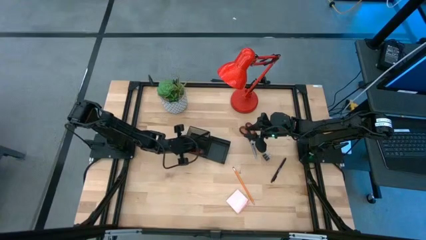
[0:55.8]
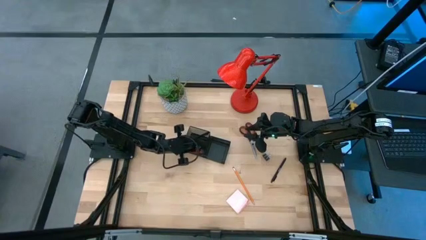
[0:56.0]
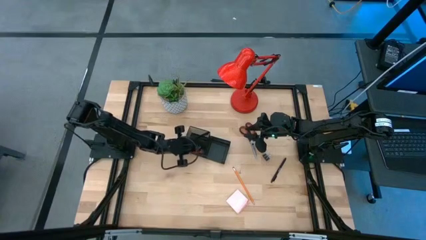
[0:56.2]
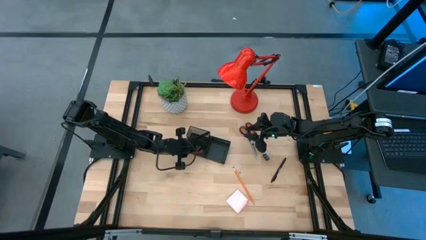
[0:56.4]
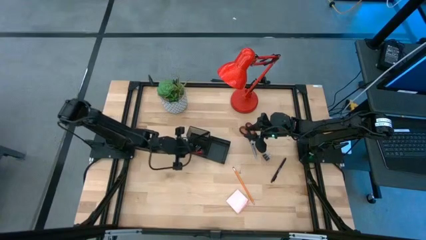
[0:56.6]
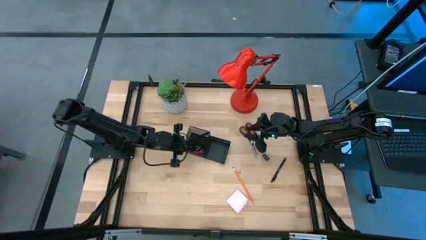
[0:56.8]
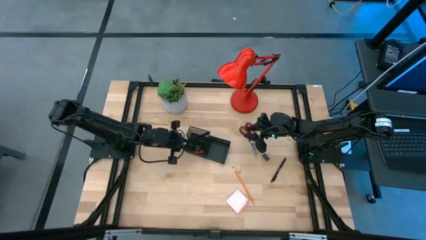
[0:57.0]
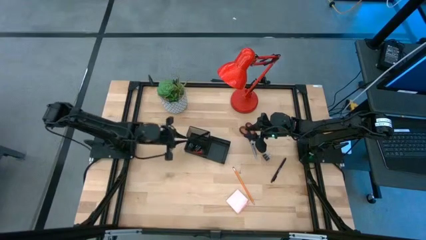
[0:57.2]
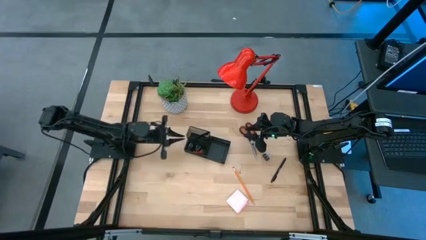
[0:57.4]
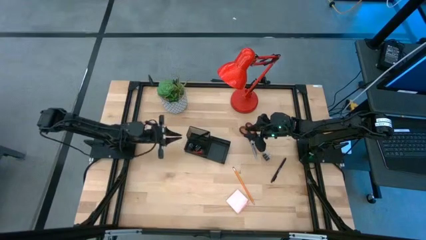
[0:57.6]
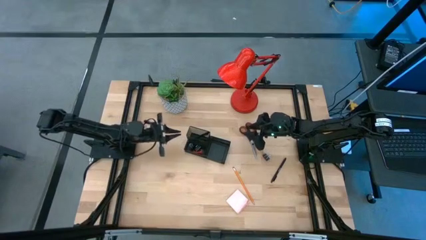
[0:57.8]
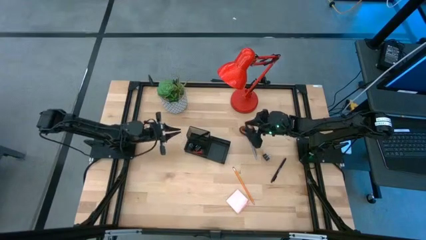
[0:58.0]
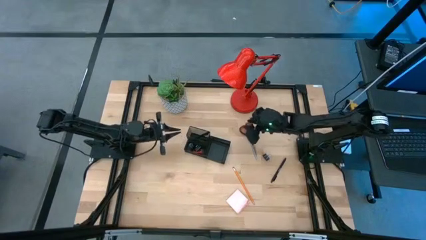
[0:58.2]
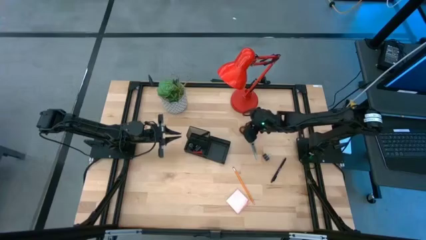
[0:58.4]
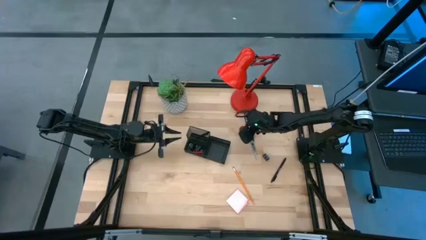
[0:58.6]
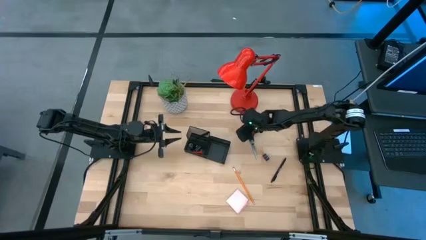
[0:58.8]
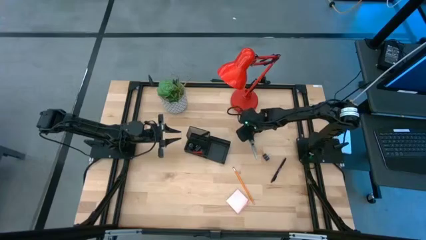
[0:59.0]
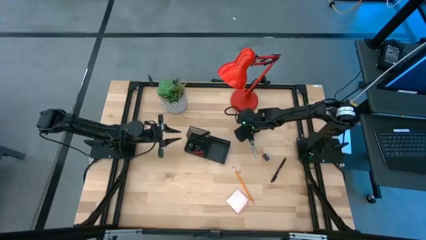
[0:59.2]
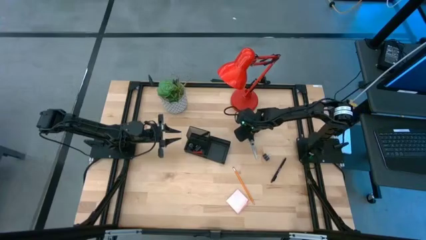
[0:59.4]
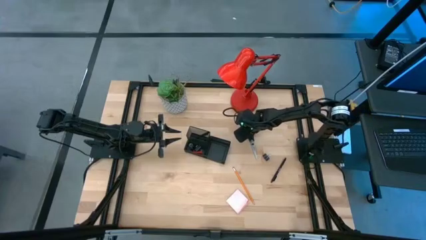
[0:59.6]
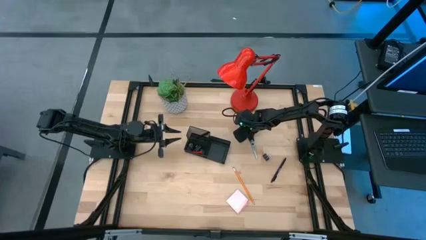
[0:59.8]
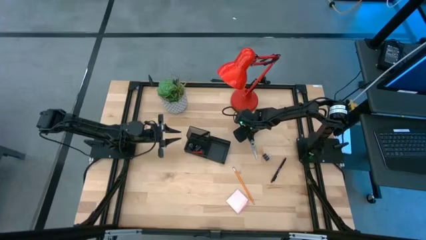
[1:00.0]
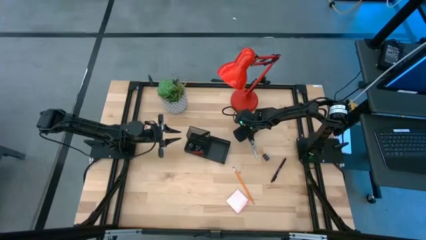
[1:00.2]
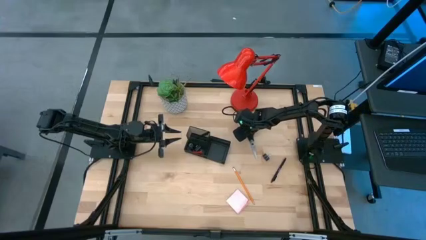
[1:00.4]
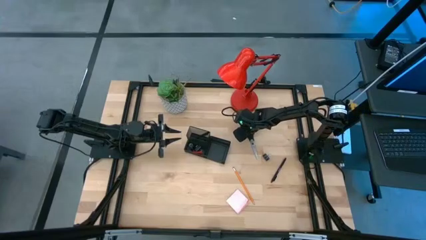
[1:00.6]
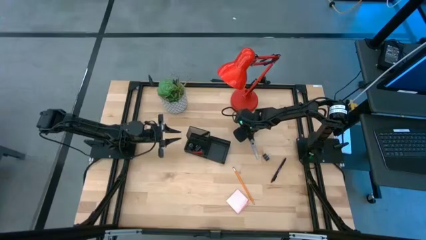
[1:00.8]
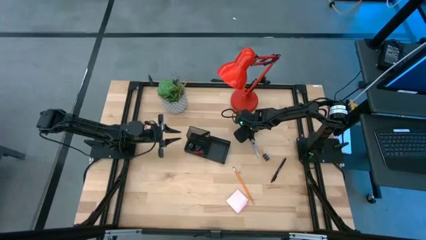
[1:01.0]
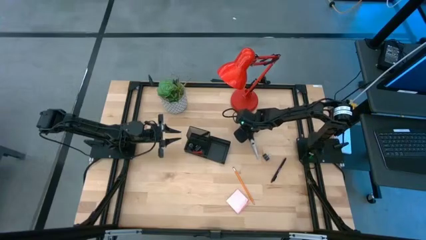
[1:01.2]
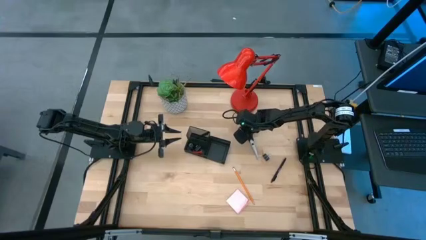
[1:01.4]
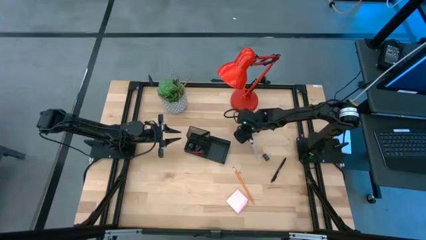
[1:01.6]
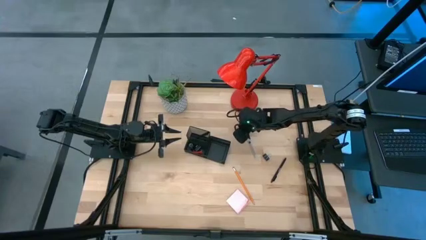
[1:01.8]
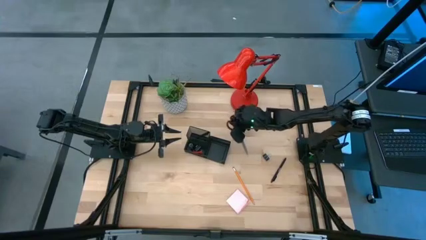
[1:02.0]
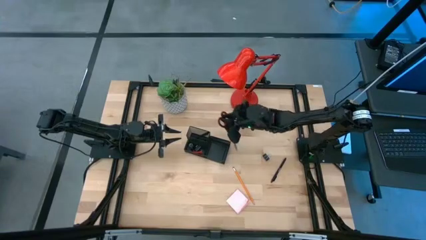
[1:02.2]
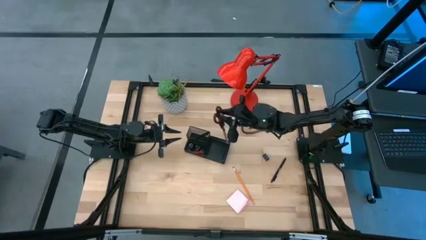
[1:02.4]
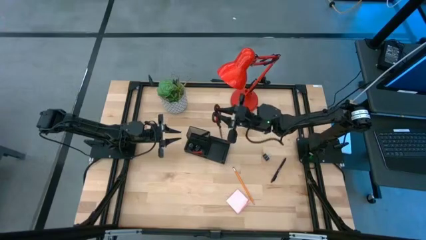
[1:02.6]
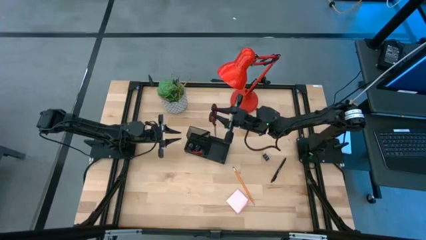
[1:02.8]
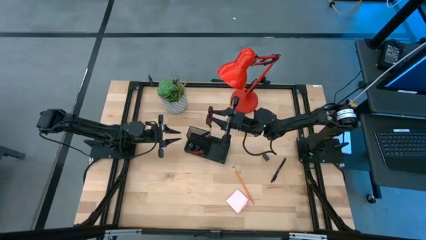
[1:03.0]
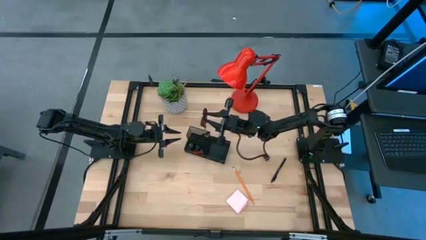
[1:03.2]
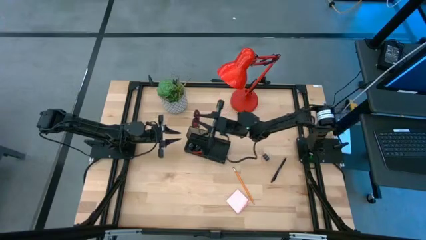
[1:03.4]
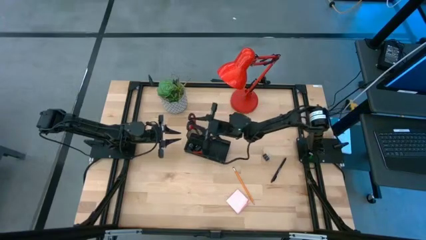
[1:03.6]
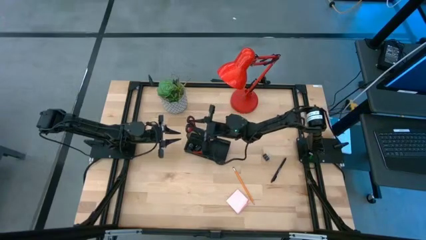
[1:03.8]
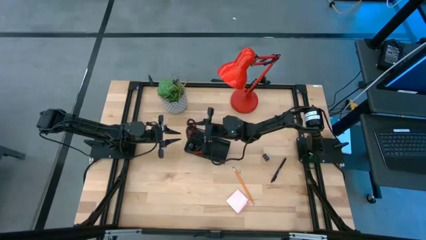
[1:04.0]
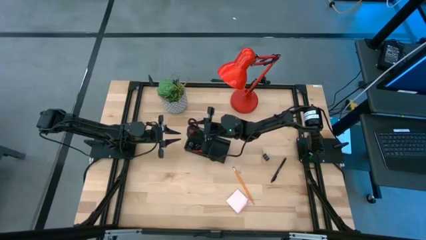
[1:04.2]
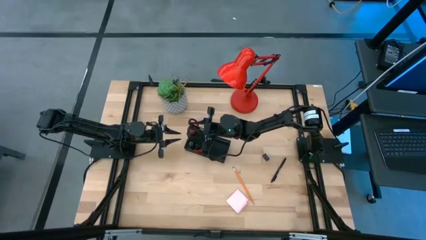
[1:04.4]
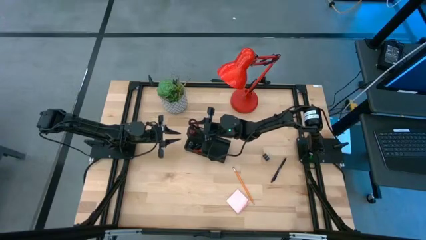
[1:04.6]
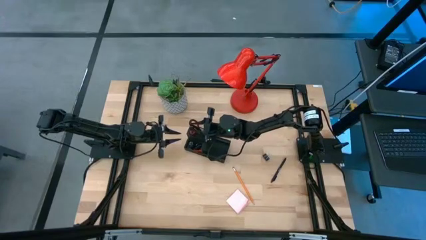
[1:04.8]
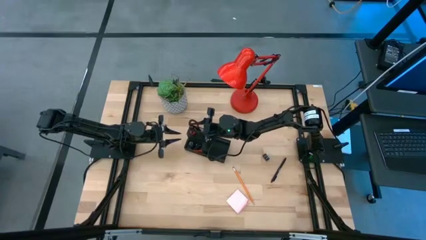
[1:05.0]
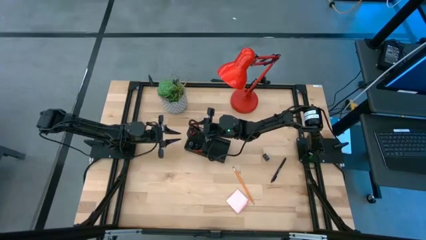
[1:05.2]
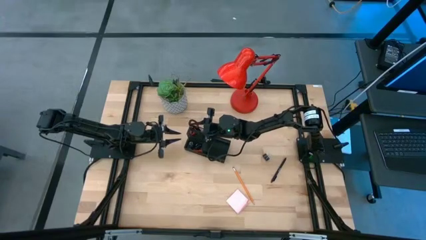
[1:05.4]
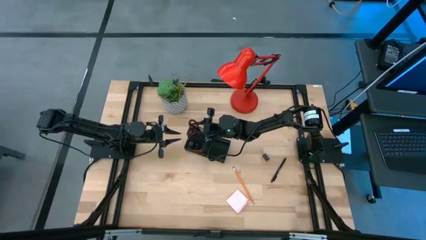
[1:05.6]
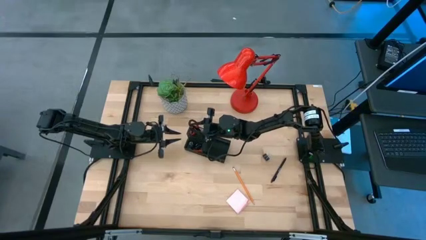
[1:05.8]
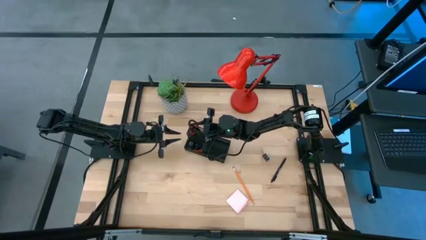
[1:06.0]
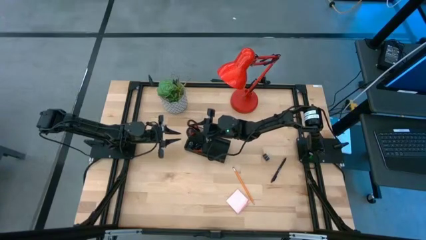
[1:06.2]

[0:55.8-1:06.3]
Task: Pick and place office supplies into organizer
Put the black scissors into the black desk organizer
